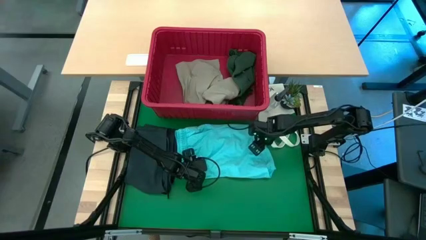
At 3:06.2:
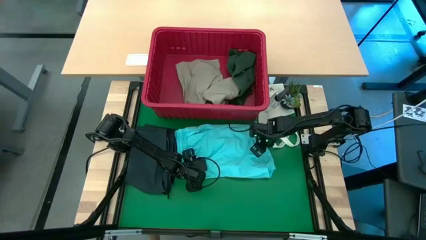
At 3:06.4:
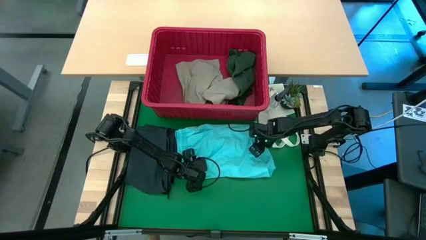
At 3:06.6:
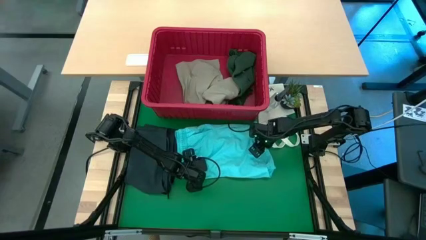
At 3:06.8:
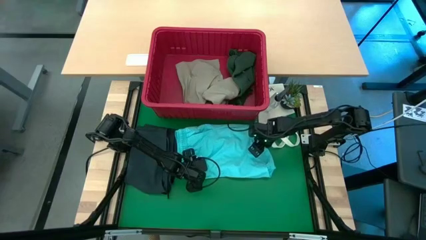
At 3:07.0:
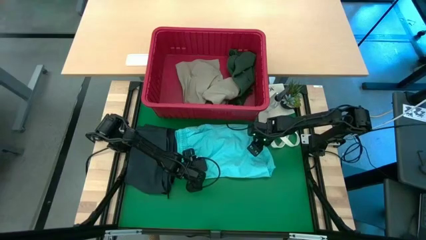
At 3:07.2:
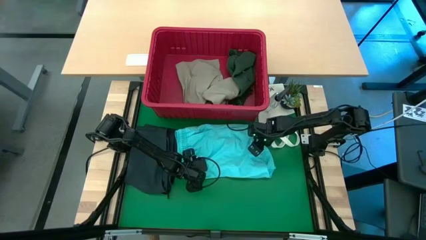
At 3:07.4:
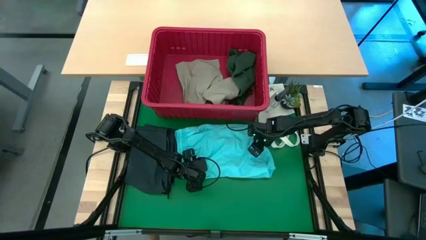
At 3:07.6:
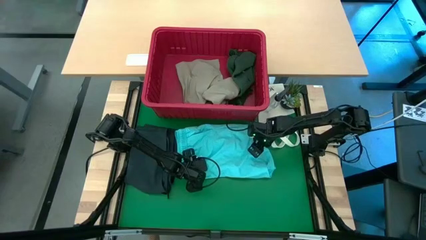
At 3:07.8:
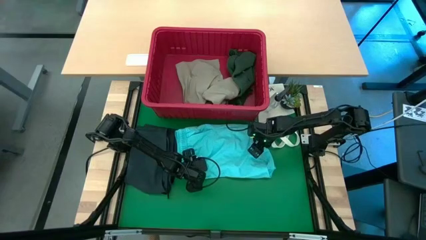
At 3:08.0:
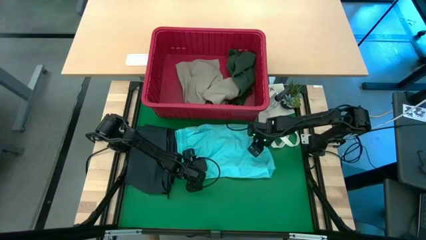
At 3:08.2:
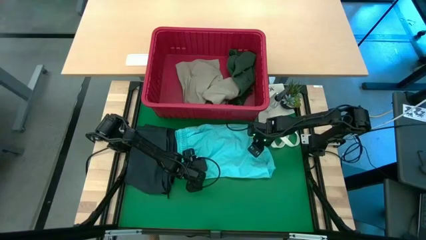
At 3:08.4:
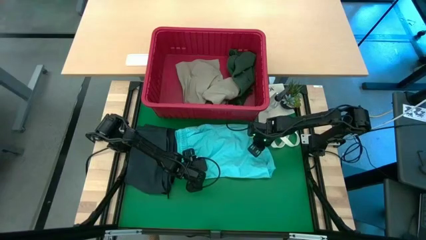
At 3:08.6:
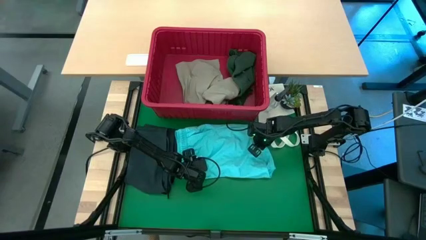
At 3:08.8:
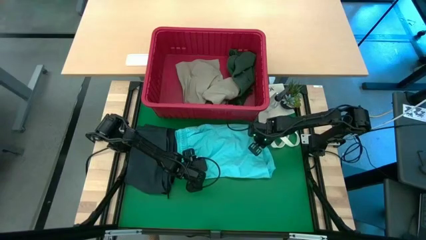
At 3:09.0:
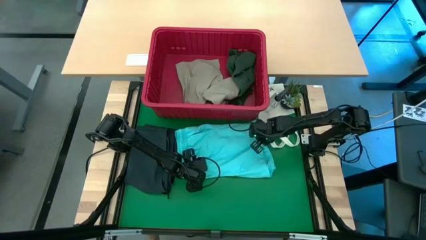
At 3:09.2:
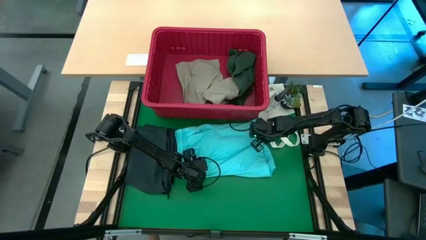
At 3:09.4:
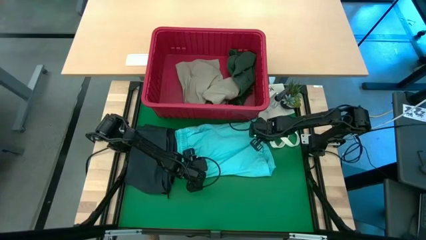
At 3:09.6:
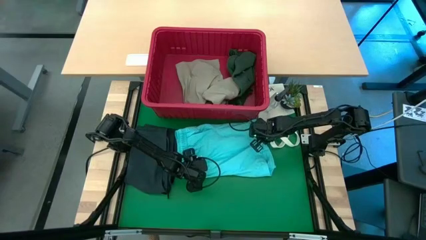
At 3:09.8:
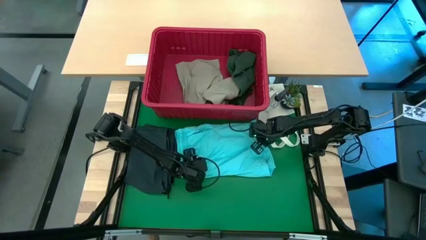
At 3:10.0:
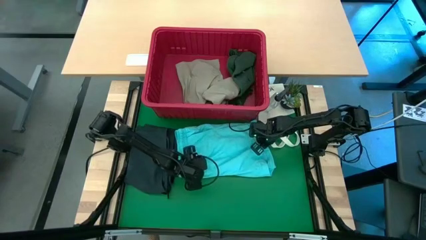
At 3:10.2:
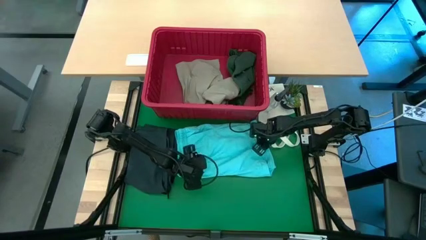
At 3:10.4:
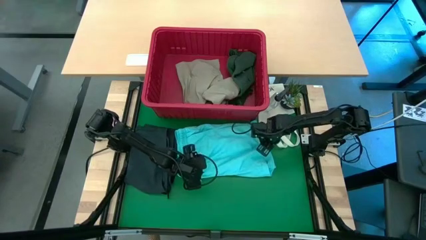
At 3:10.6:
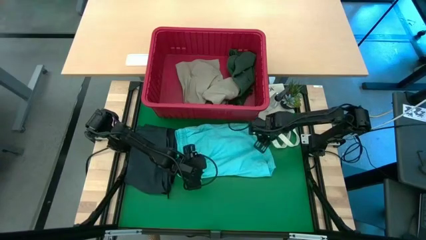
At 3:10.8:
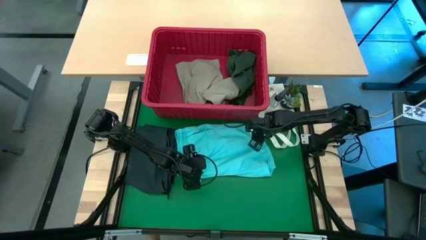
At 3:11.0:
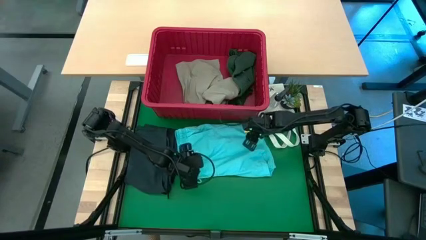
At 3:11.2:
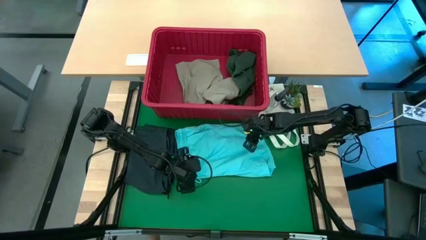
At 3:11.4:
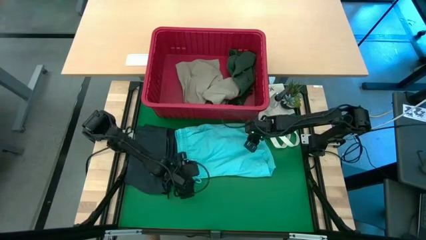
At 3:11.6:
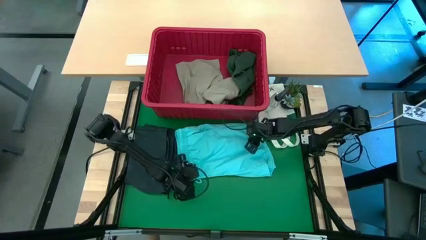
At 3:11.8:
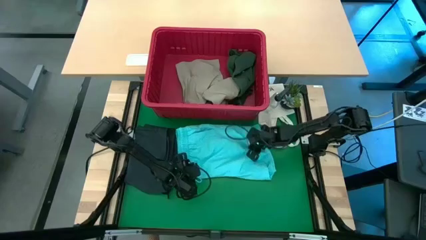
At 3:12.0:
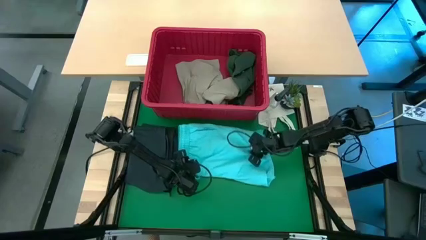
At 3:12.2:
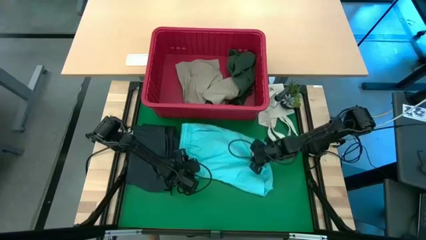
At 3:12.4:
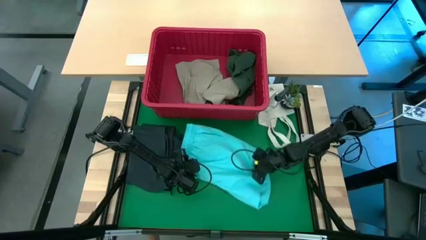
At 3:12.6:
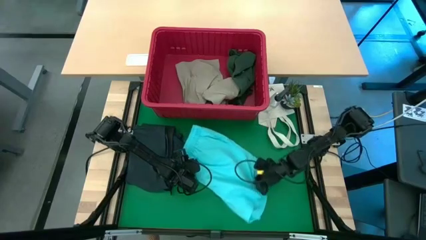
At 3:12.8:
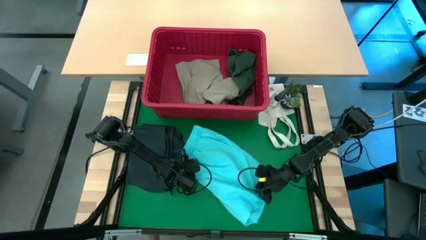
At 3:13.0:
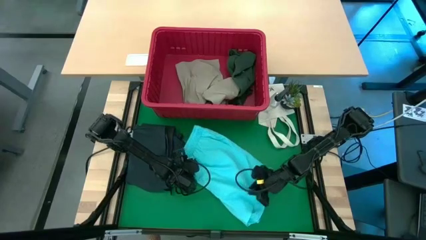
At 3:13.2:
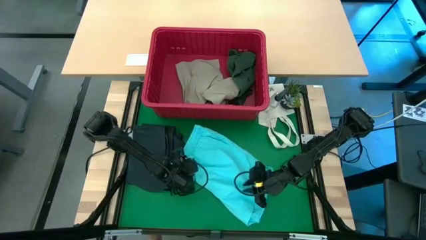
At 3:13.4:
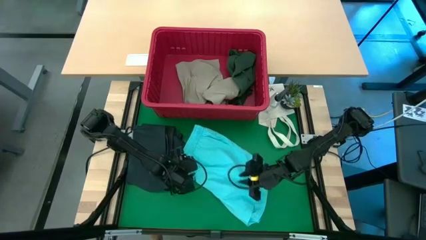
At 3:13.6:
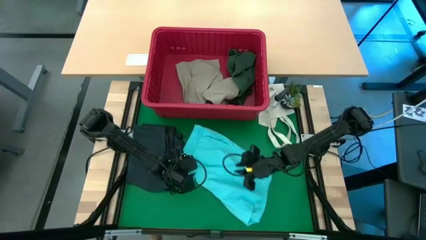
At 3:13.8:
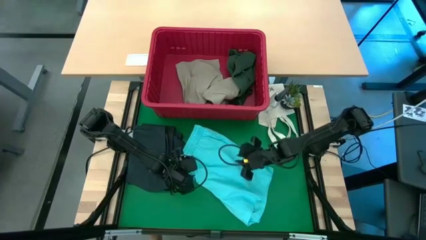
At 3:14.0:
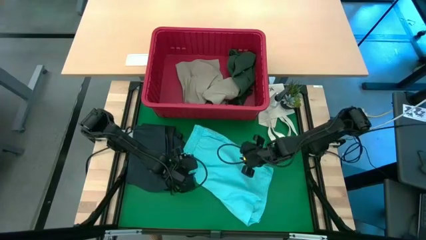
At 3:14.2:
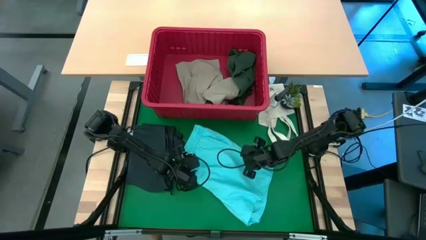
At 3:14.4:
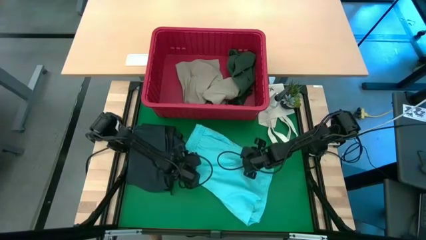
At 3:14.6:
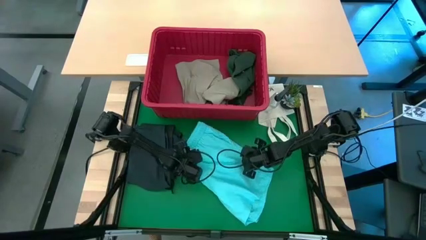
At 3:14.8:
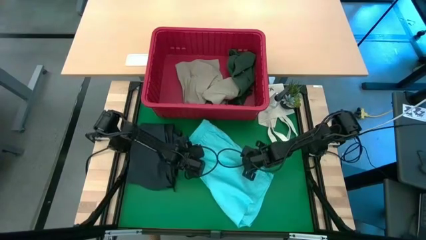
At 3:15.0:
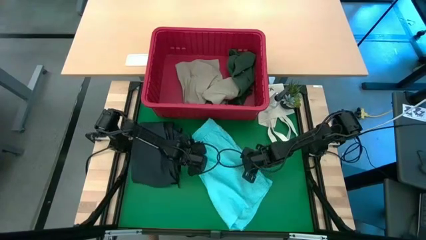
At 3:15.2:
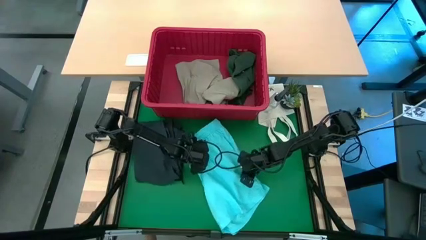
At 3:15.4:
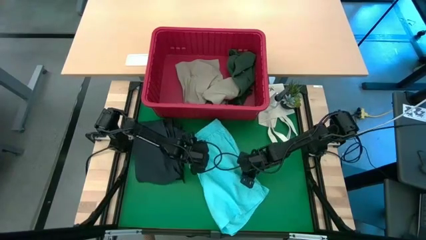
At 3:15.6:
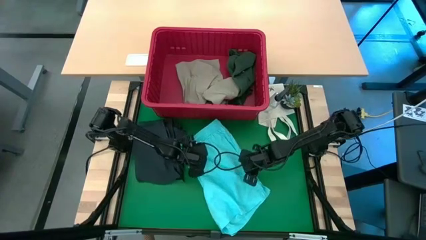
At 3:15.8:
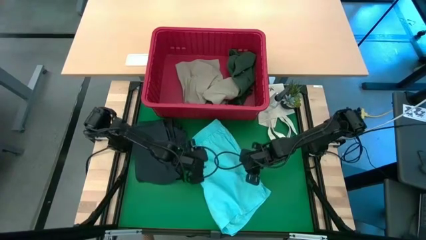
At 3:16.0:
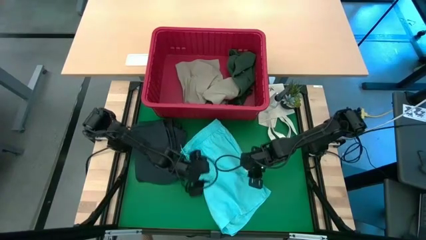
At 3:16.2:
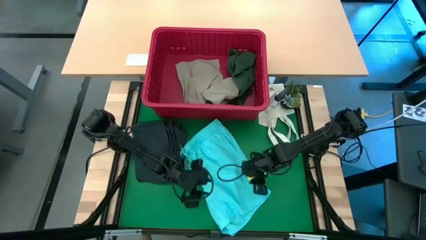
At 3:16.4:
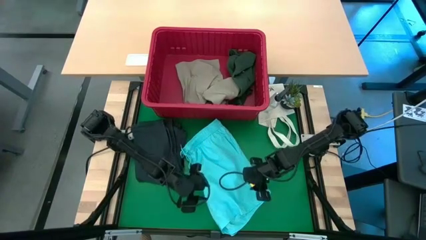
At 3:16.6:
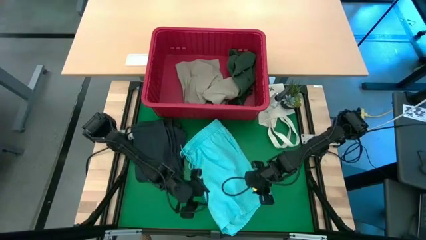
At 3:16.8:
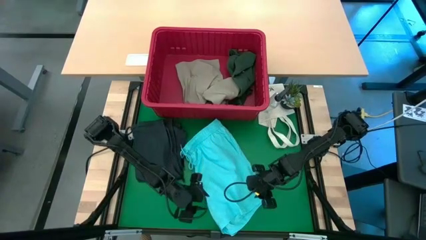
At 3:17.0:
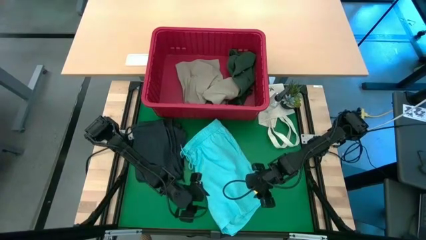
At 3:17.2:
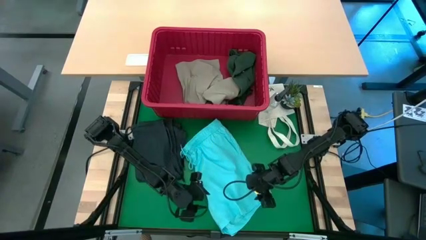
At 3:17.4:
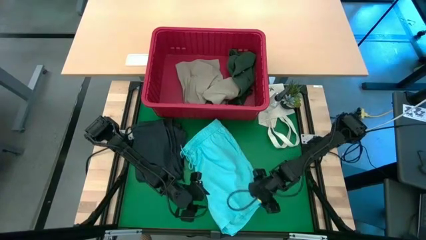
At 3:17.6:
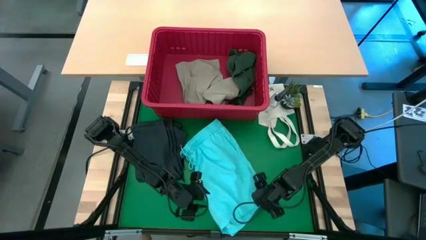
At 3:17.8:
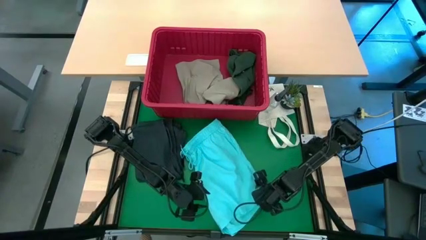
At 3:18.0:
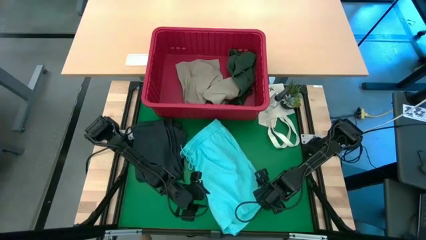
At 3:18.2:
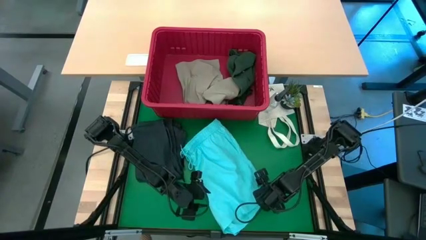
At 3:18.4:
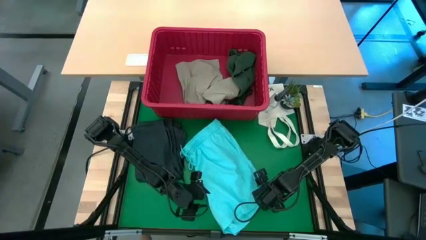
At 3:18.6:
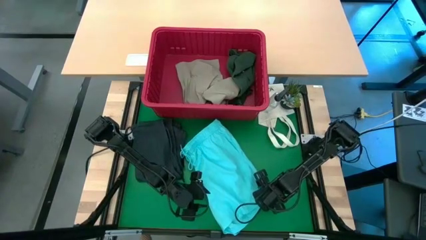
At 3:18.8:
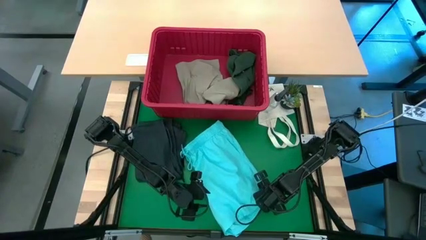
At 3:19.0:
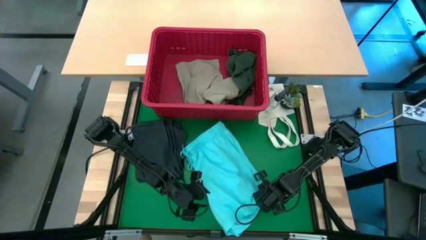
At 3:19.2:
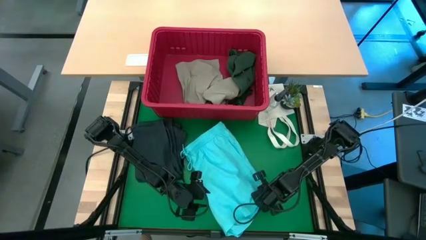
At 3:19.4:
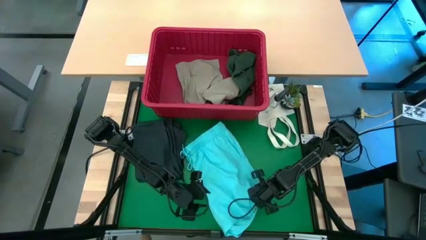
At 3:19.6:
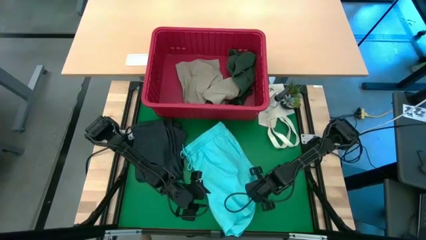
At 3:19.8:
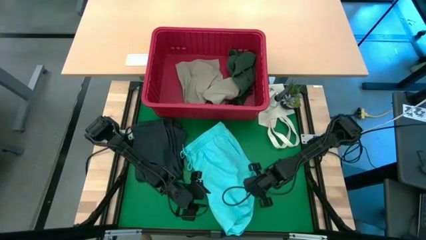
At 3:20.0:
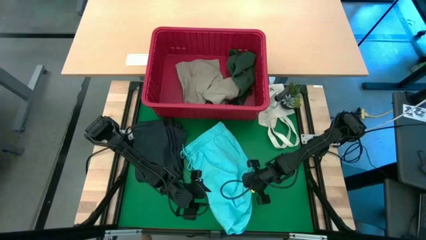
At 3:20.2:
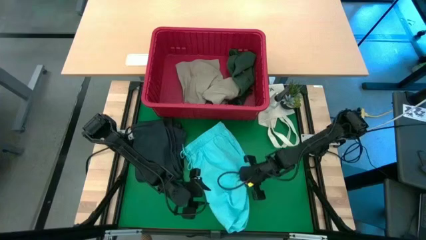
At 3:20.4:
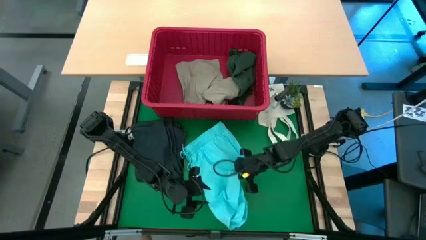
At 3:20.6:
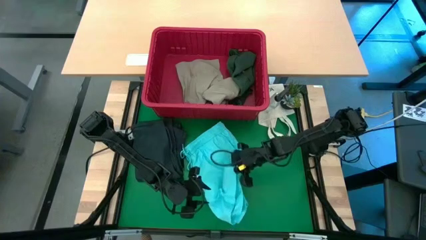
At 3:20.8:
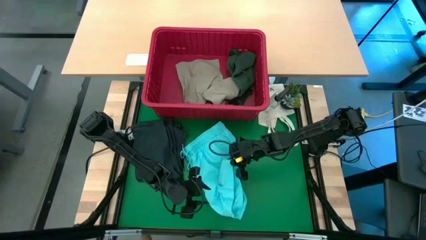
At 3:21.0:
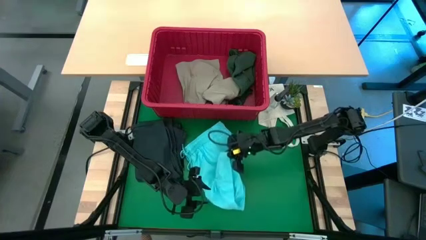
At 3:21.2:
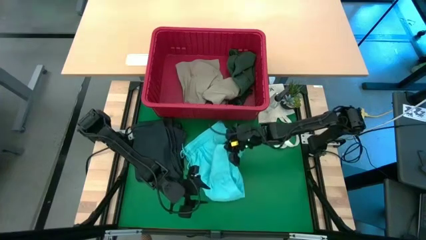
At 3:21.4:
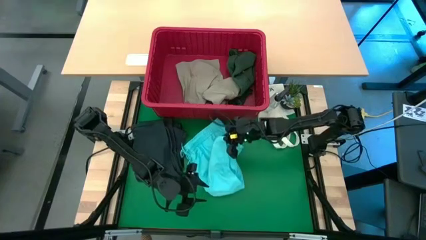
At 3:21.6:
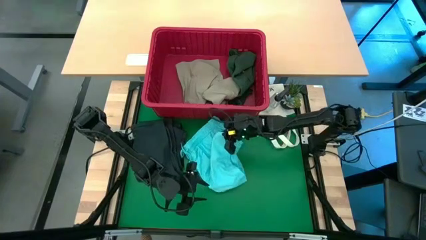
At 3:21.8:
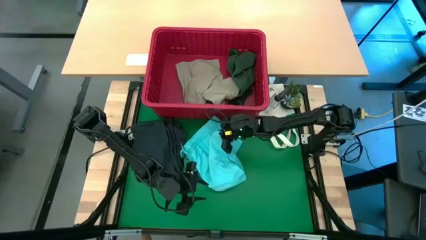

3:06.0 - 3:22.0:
Task: Fold Laundry from Bin
Fold the blue shorts from the red laundry bin
